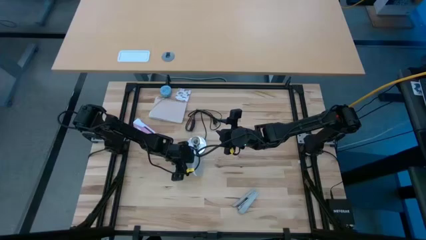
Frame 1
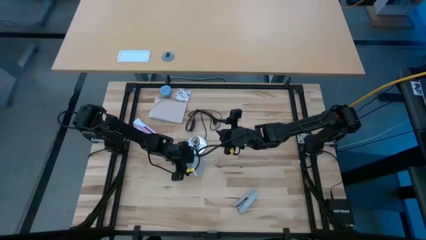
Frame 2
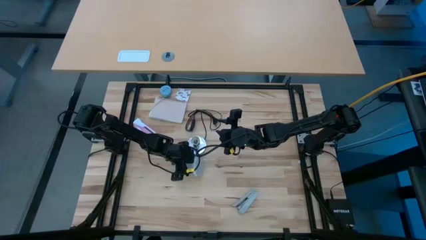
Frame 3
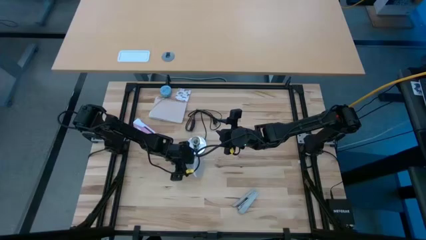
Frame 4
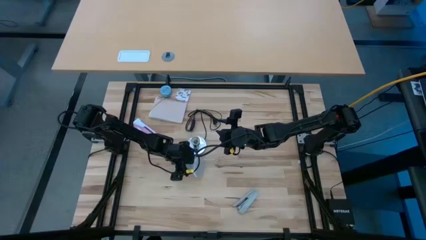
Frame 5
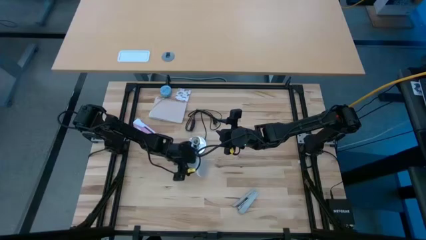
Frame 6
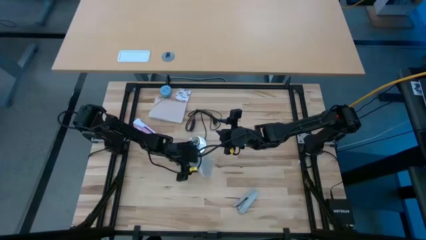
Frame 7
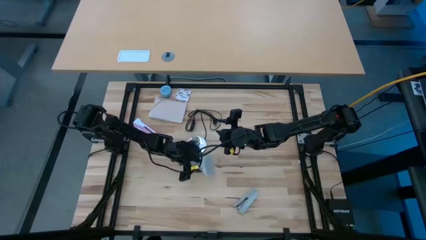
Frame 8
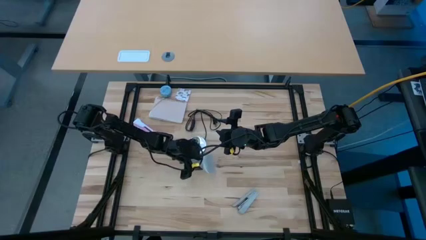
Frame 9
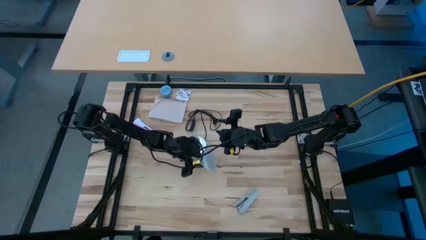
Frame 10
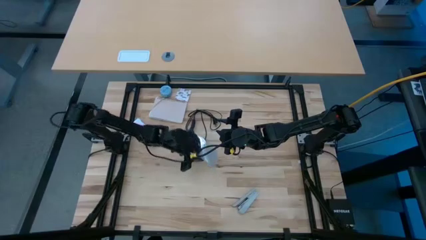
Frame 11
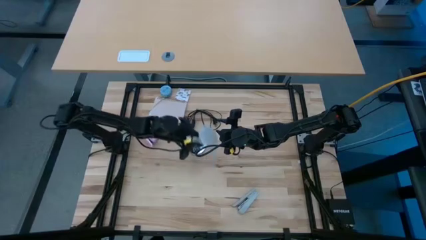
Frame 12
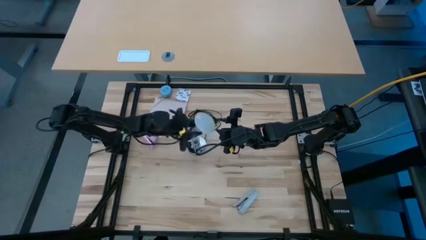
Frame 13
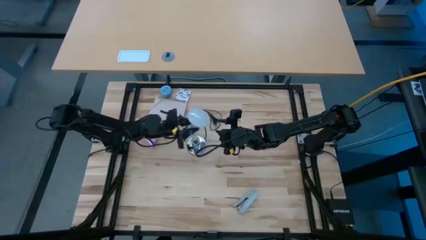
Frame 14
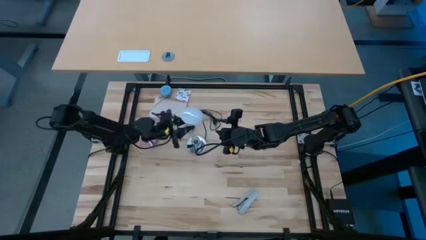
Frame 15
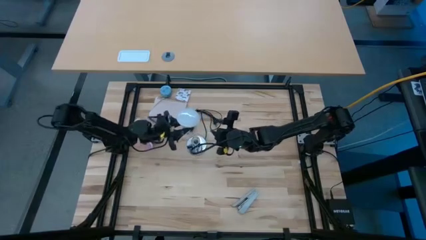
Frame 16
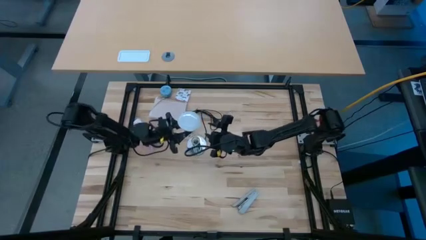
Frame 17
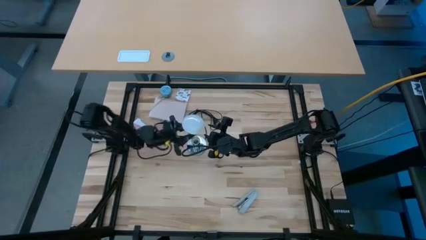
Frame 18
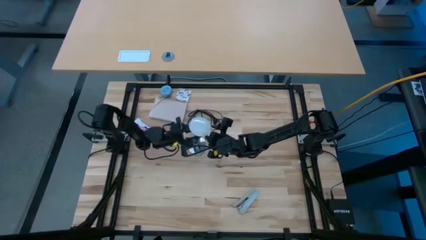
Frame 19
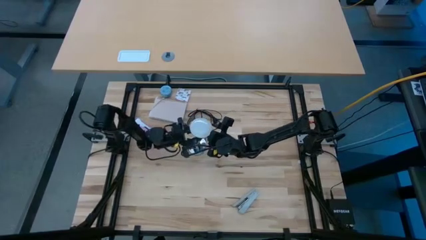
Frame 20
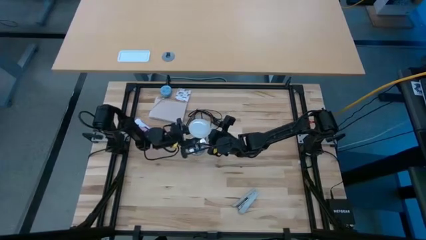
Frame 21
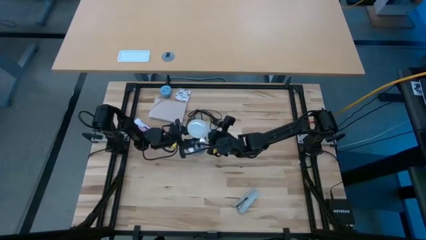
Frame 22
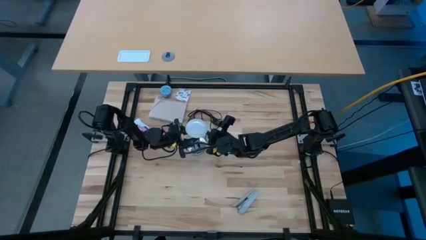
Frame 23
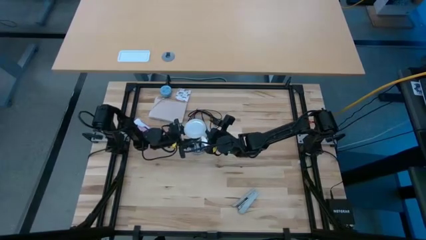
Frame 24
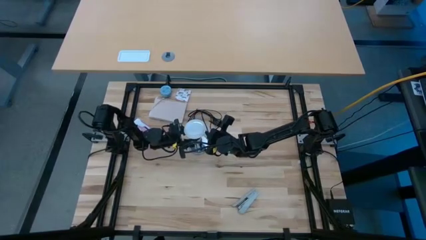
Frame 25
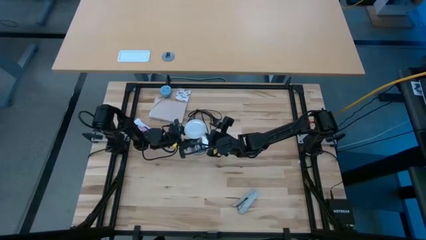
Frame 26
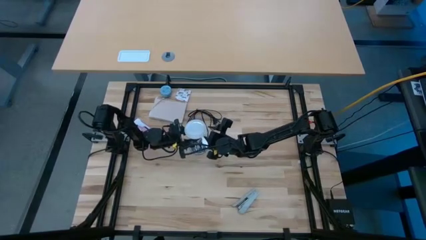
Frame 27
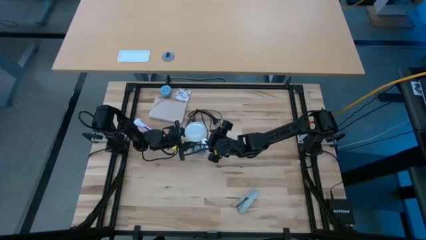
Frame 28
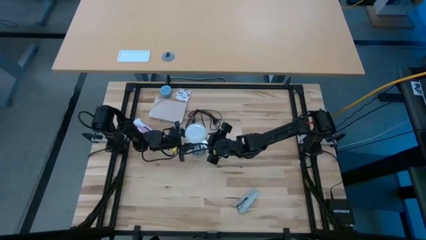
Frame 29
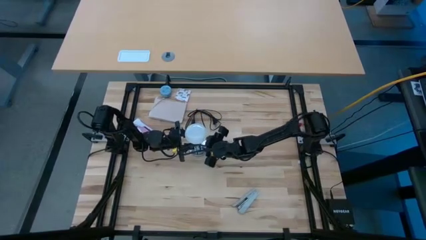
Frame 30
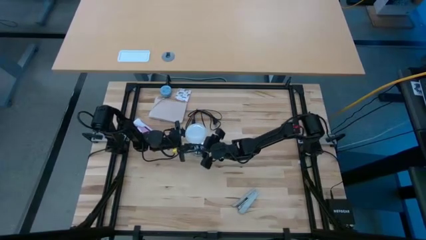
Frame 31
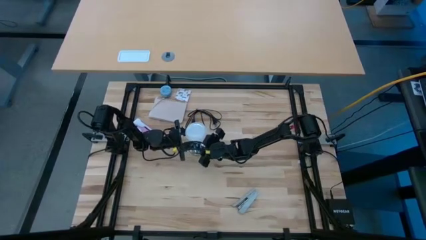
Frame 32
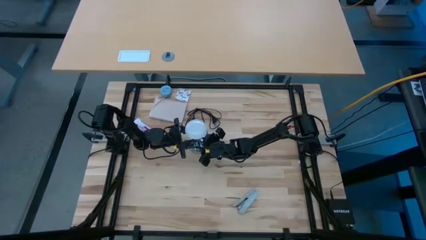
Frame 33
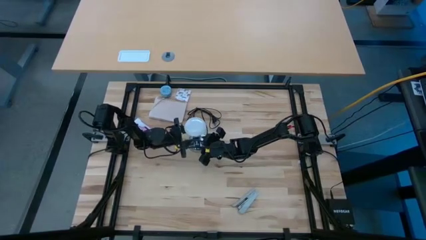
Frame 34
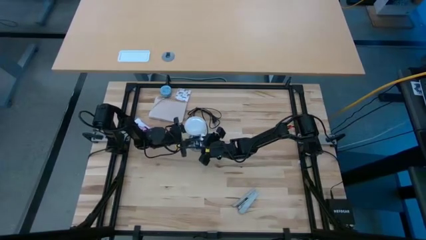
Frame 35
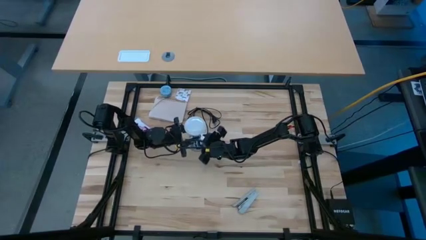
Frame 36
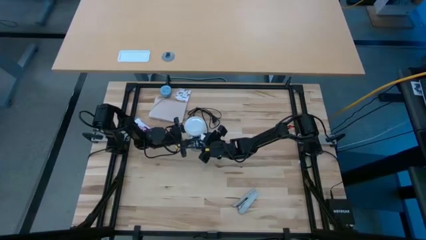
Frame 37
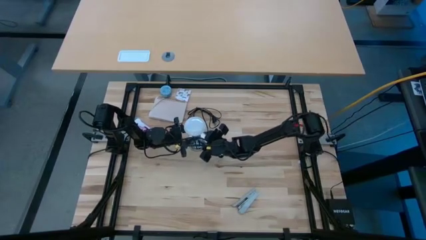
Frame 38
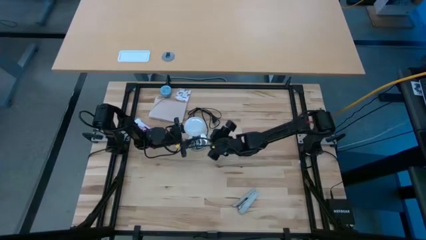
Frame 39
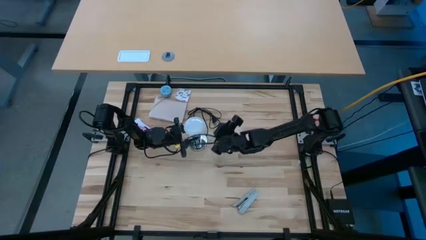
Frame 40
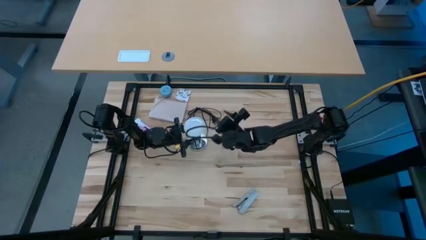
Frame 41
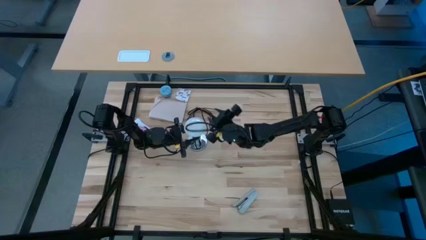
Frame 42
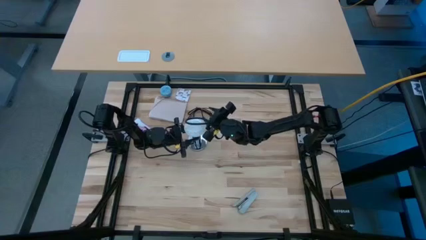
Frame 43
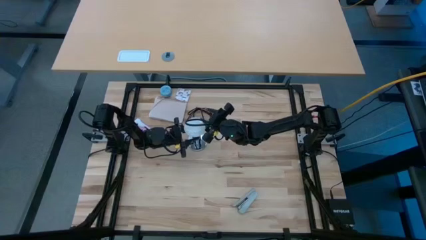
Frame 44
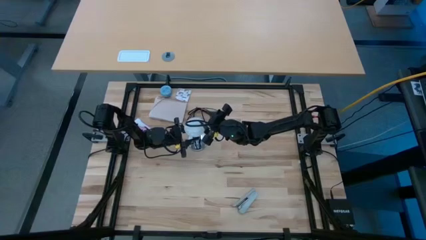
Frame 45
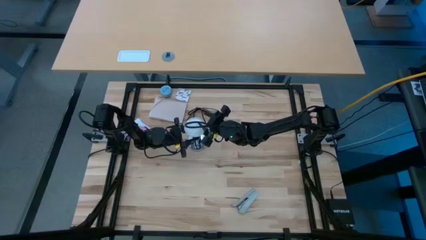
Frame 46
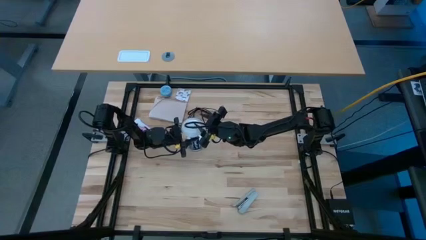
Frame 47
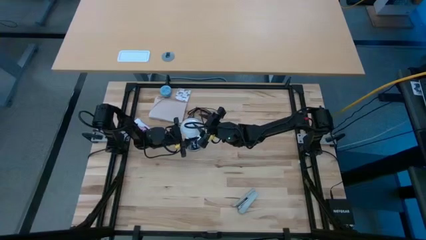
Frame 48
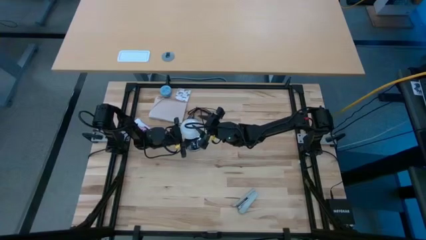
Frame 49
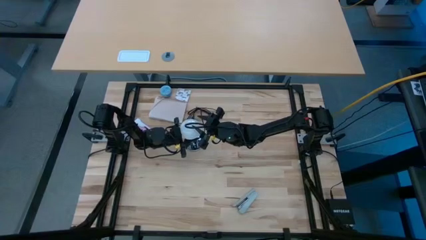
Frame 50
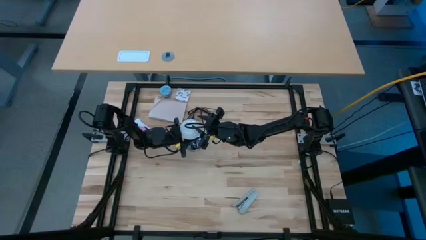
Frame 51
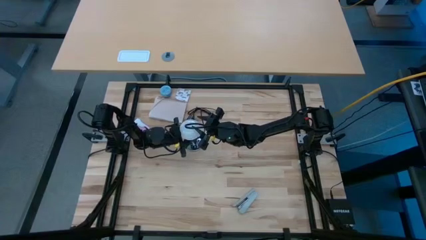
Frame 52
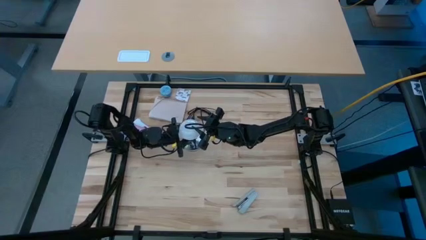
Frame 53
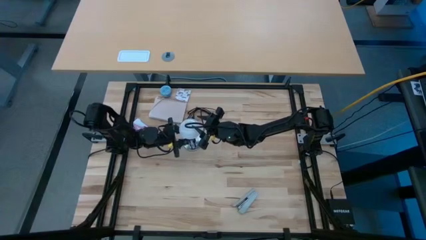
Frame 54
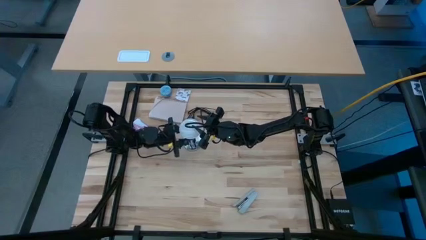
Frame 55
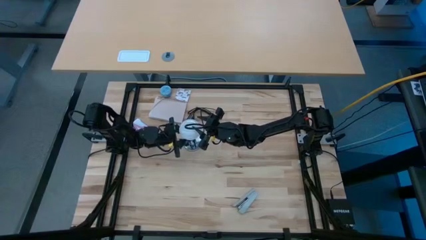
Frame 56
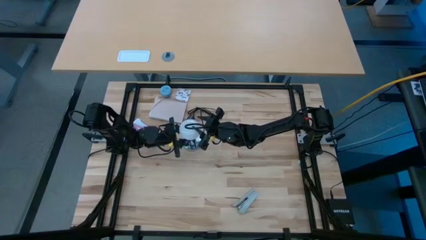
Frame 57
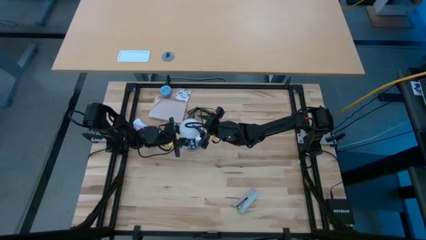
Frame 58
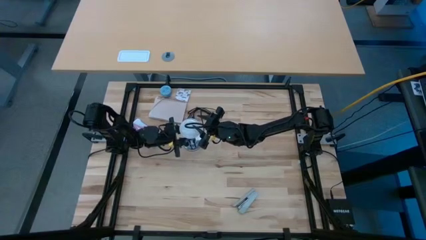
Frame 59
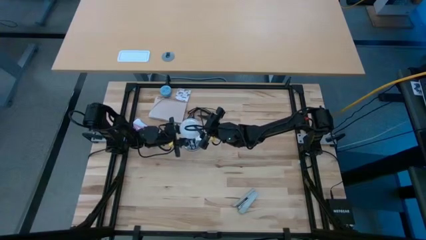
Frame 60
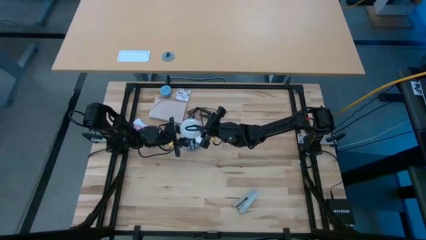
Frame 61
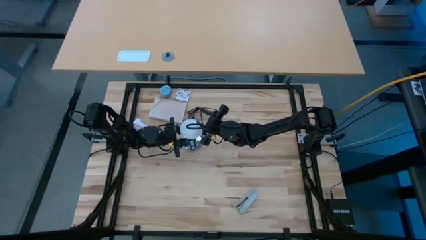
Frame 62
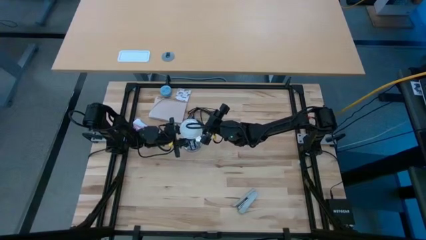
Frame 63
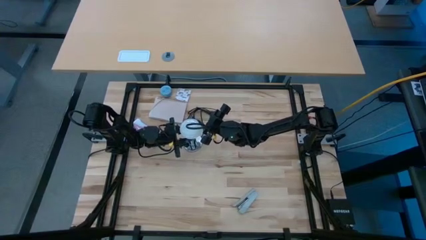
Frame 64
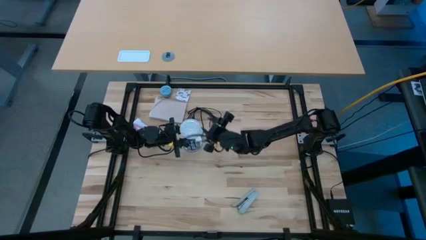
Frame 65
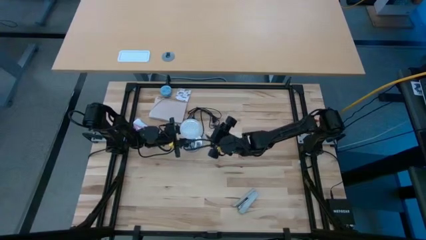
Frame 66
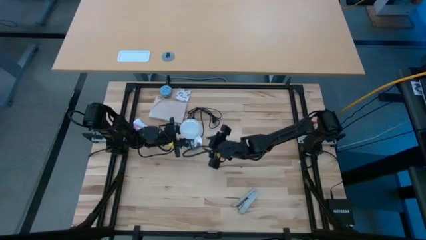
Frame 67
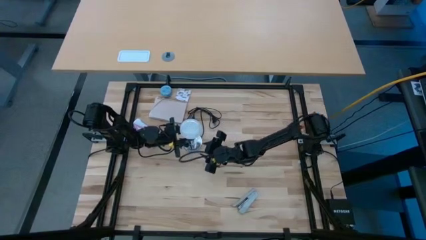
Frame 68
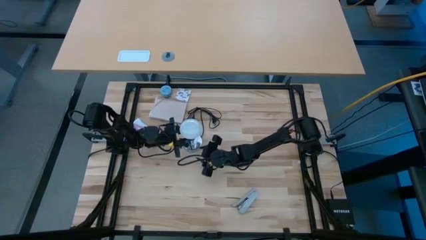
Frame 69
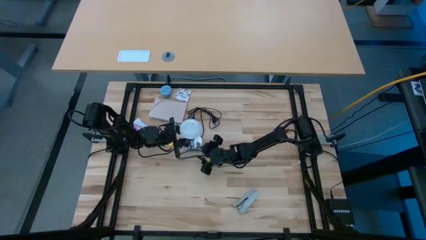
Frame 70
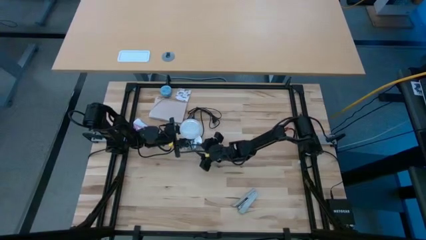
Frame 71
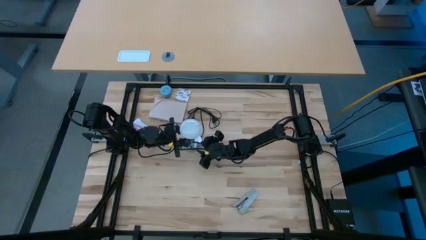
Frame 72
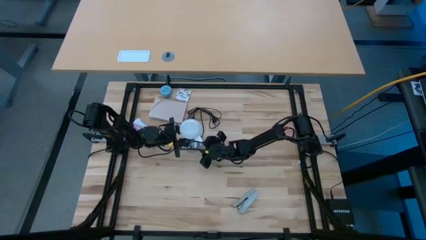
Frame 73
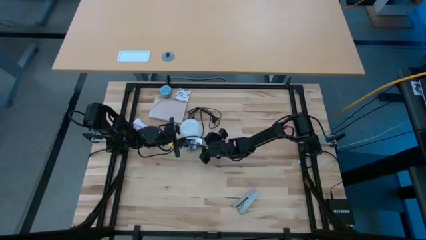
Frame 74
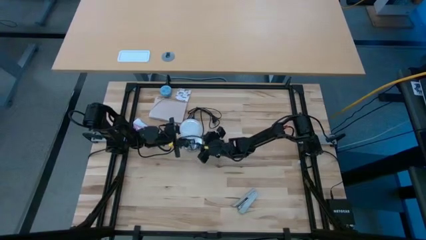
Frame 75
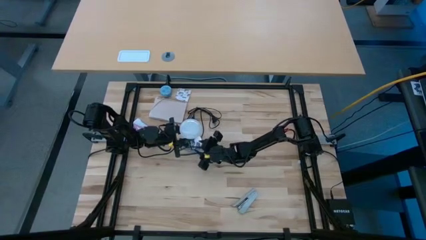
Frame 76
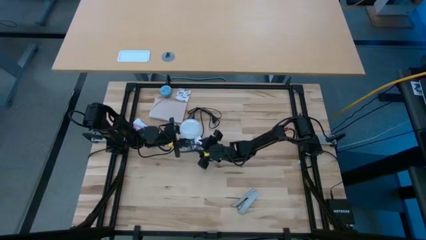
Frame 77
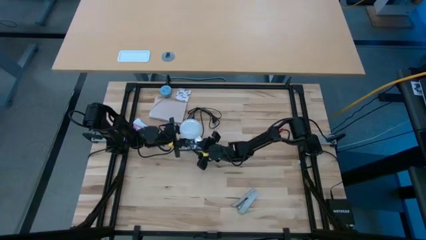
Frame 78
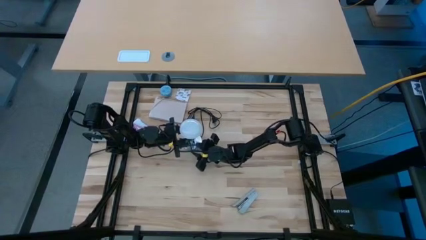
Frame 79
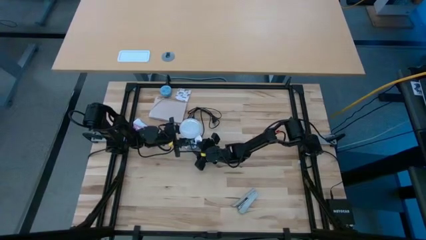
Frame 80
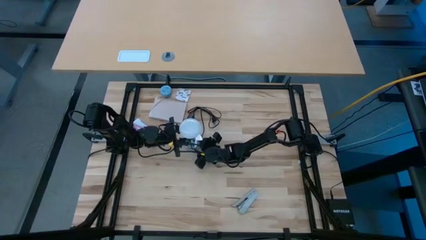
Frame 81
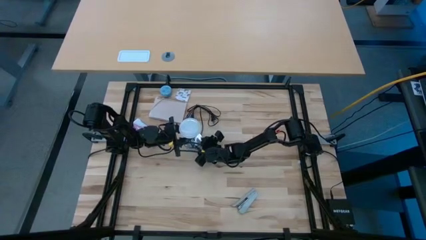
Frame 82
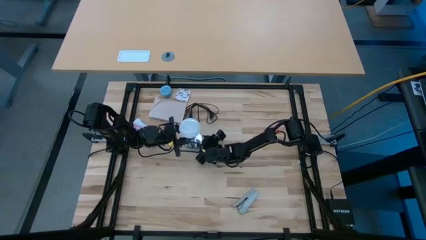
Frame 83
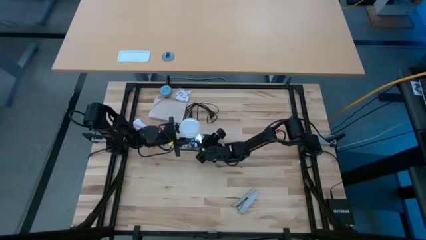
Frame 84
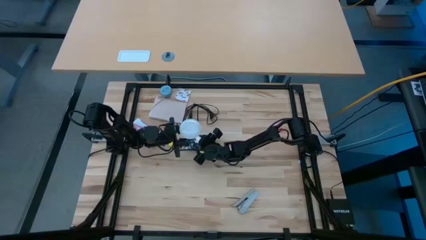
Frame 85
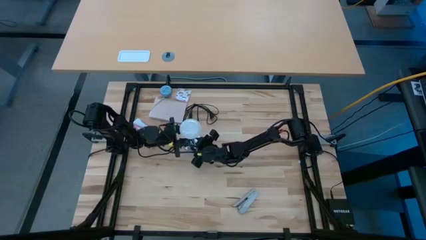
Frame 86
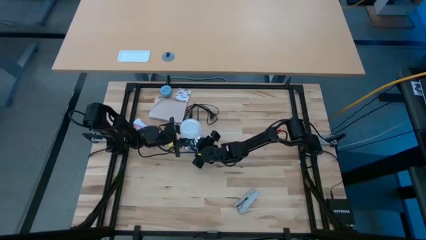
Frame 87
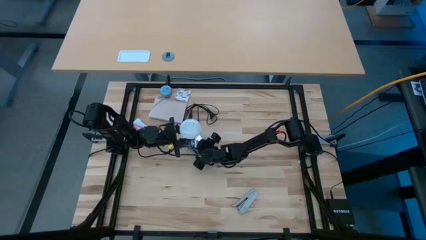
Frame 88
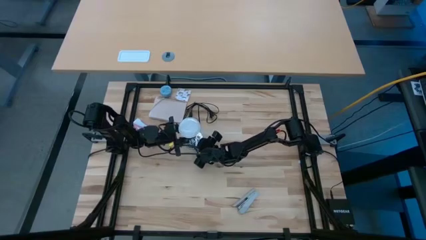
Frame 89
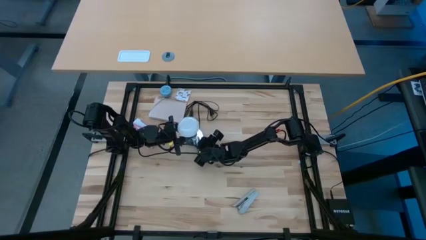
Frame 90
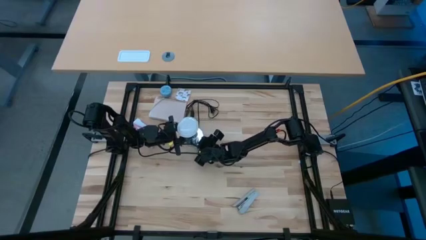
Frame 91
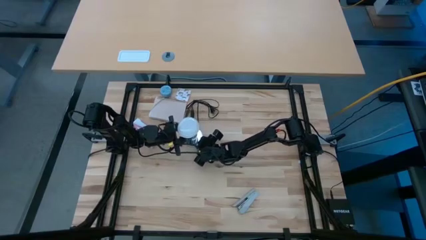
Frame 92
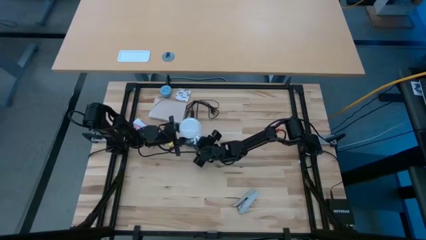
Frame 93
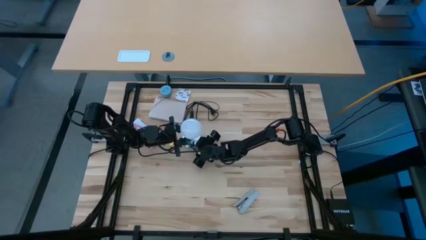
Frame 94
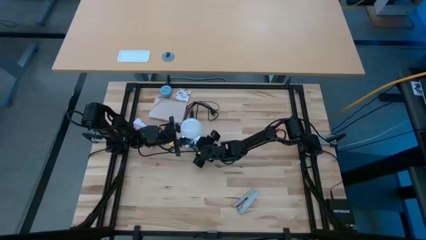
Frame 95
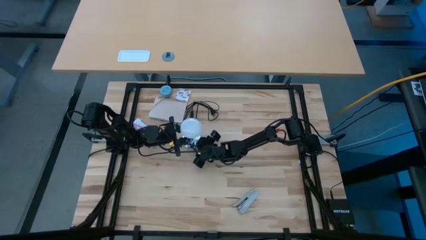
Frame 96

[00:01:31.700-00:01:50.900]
Task: Screw lightbulb
Insert the light bulb into the lamp
